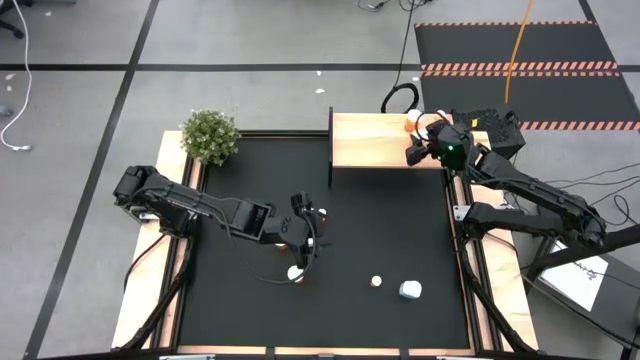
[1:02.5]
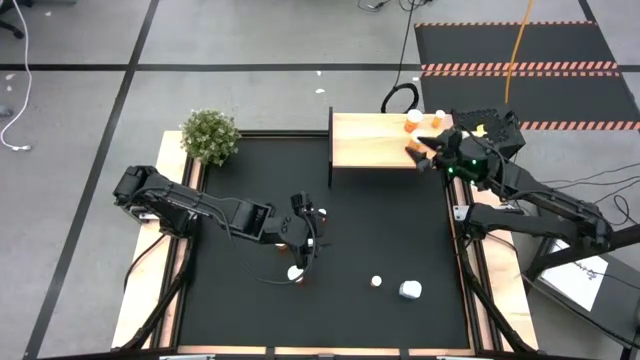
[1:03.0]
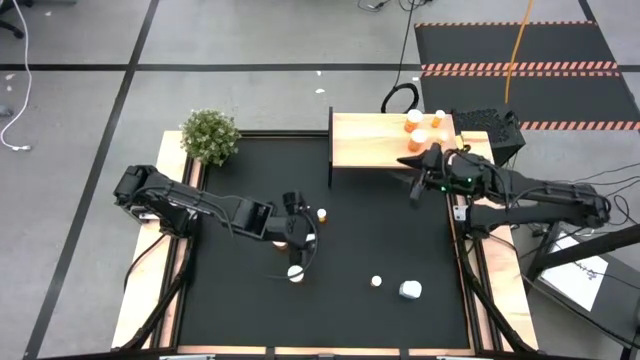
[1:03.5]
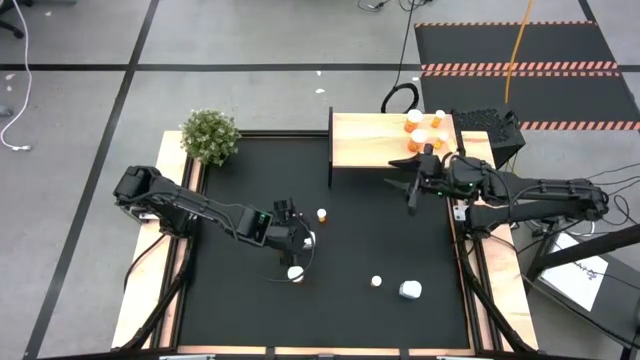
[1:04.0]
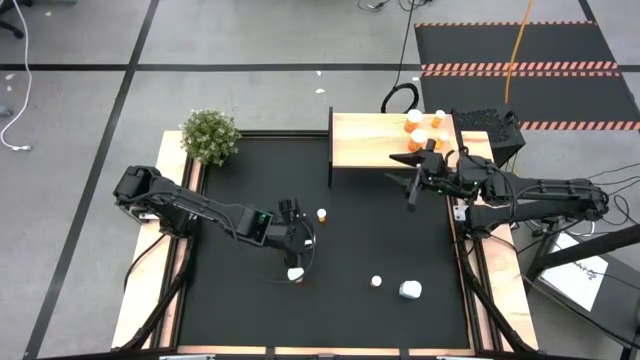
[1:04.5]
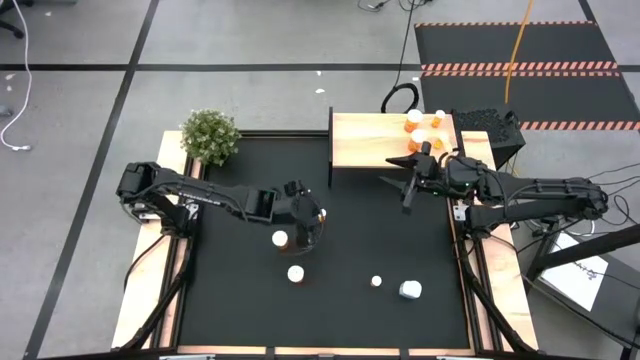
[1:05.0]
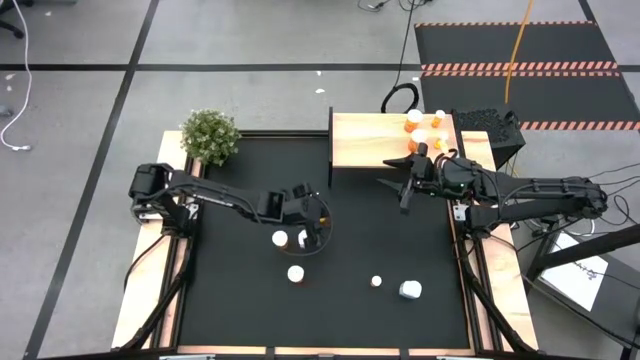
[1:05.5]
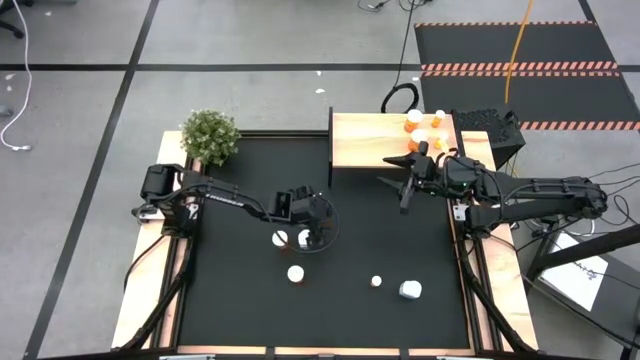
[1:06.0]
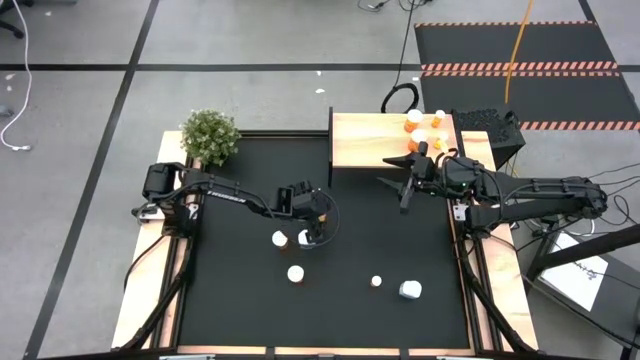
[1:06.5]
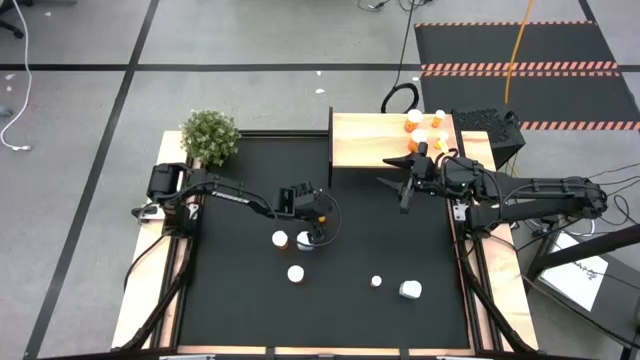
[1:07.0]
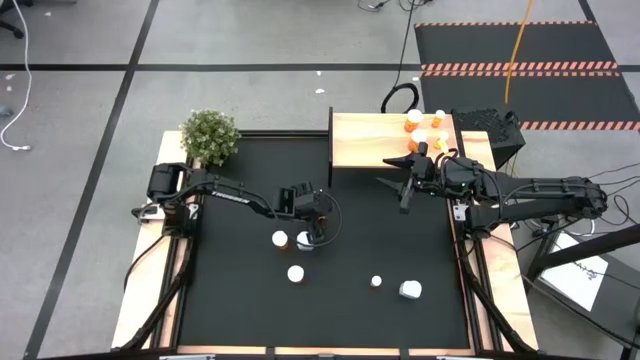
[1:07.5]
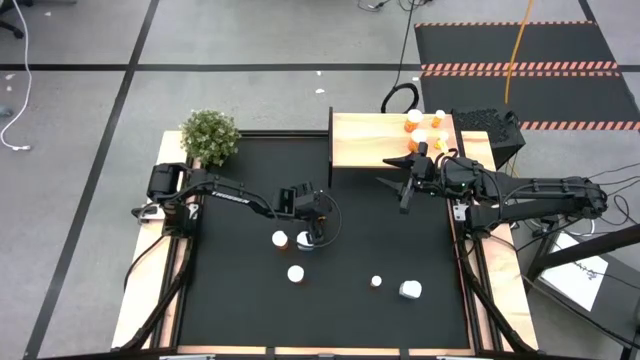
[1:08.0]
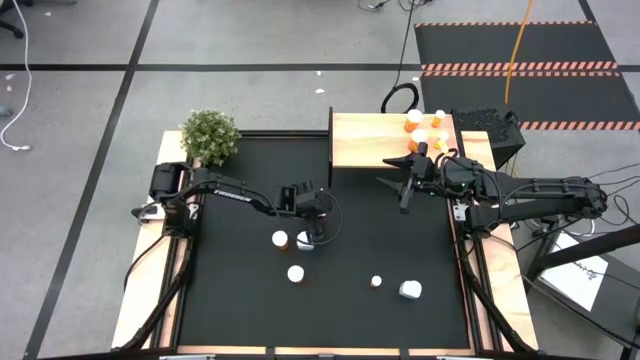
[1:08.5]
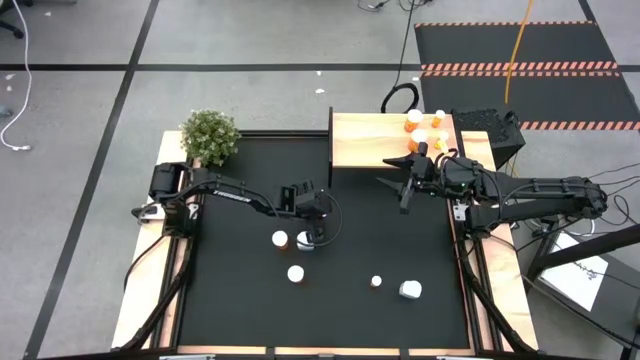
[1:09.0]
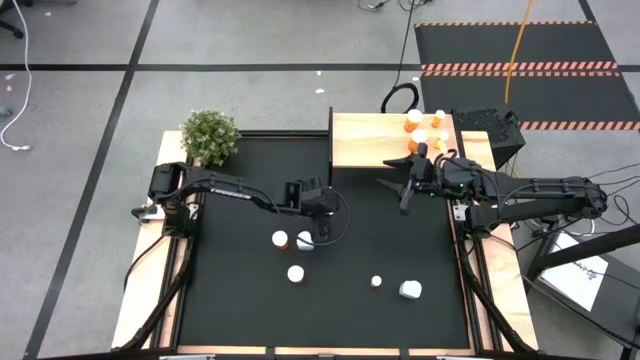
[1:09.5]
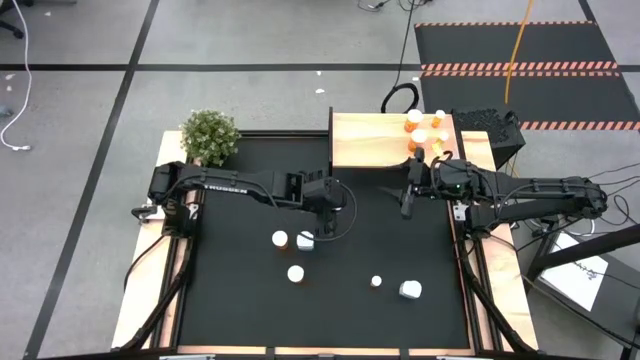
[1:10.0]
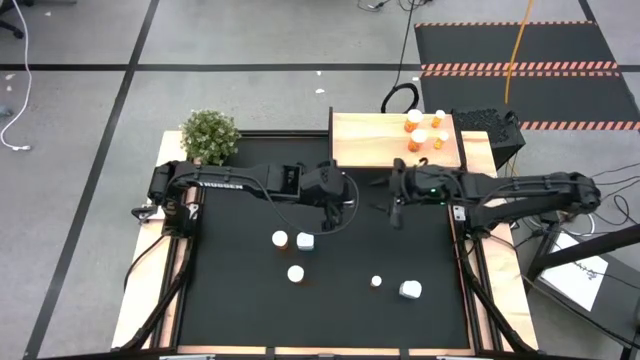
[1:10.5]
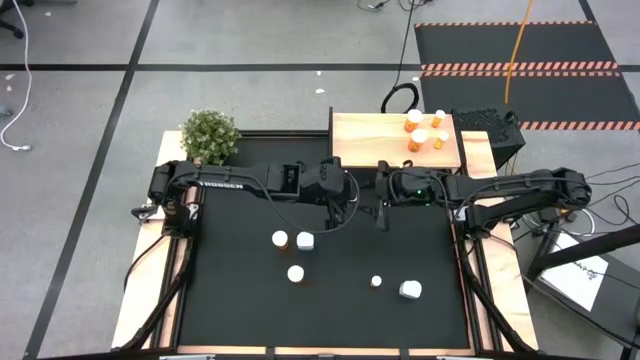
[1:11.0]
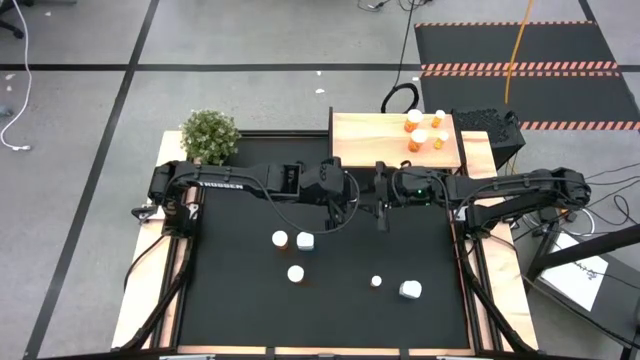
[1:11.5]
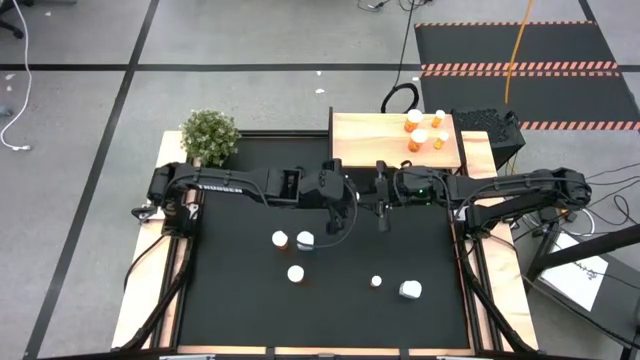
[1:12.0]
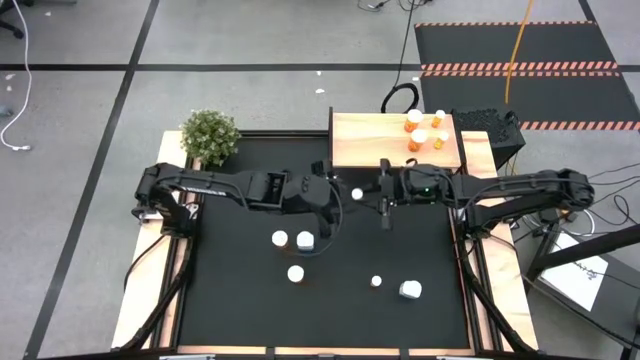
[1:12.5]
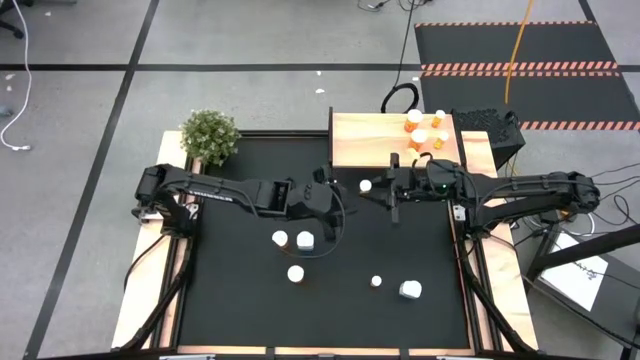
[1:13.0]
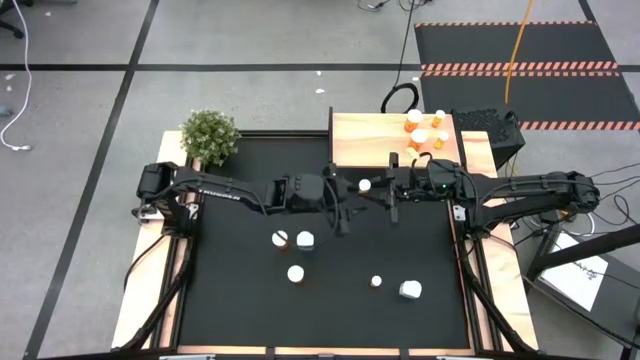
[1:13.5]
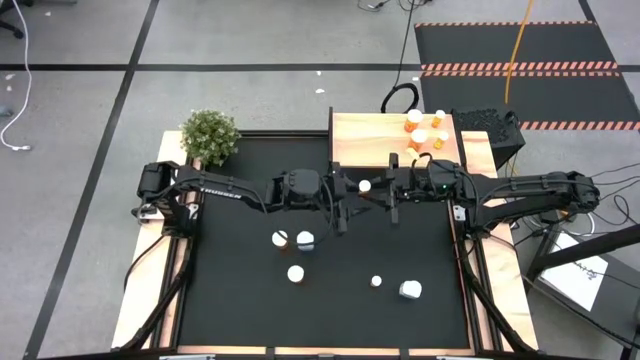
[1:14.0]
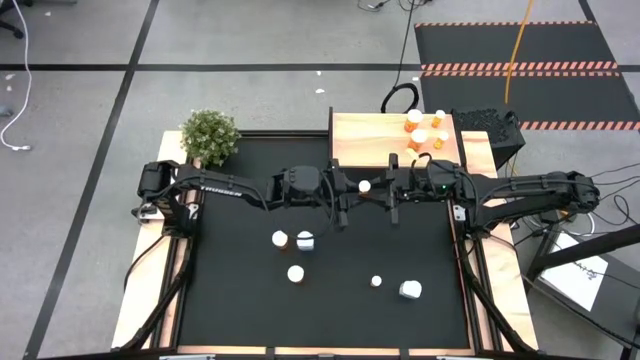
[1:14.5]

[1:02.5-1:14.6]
Task: Pick and place medicine bottles onto shelf by color
Put the small orange pill bottle on the shelf

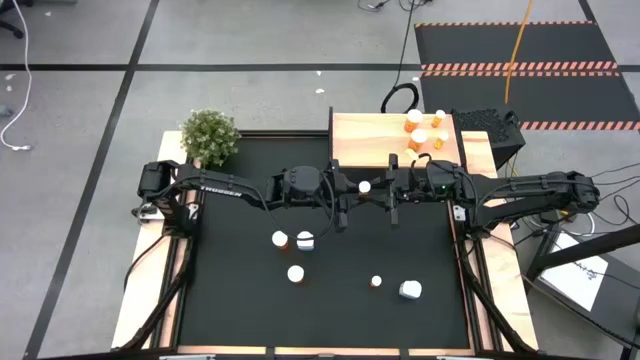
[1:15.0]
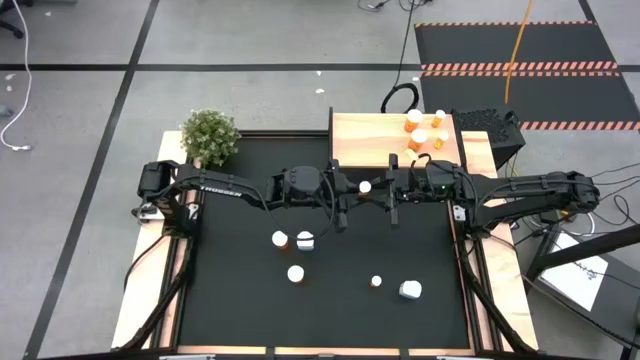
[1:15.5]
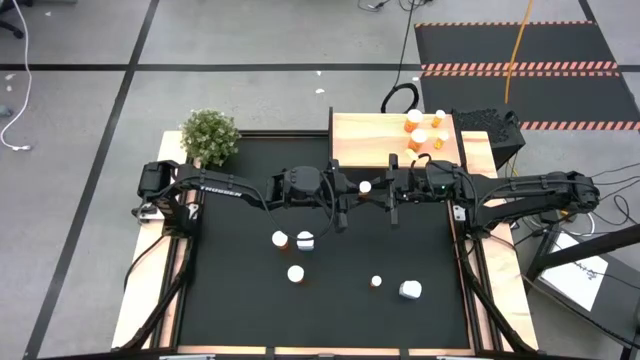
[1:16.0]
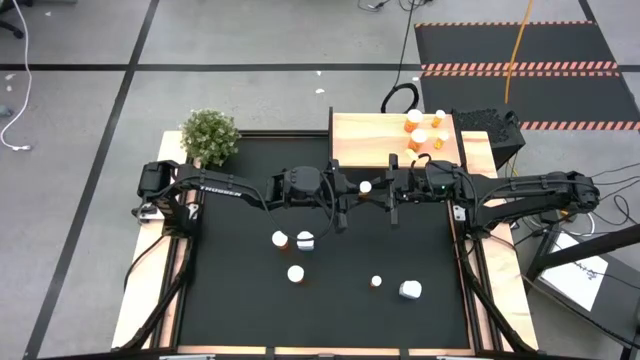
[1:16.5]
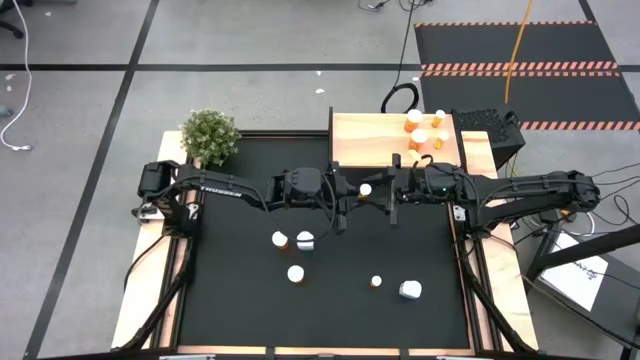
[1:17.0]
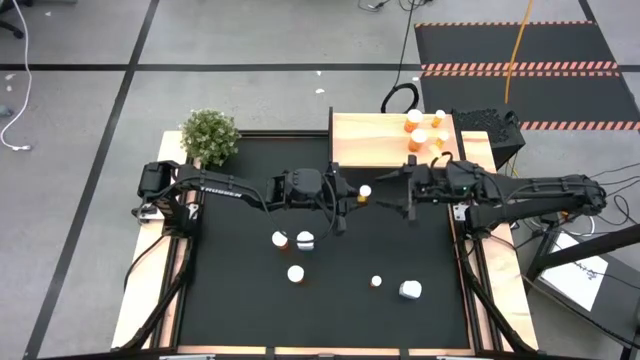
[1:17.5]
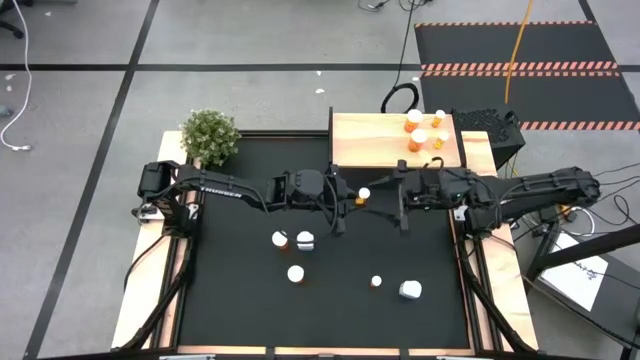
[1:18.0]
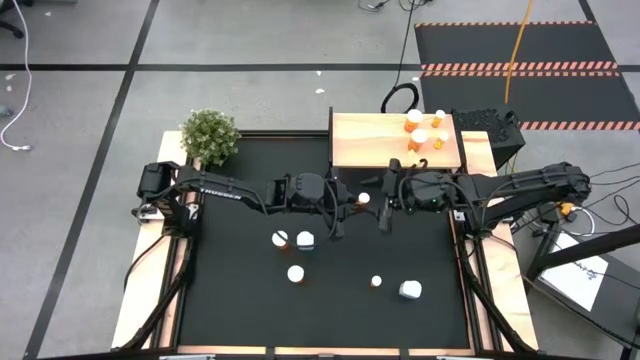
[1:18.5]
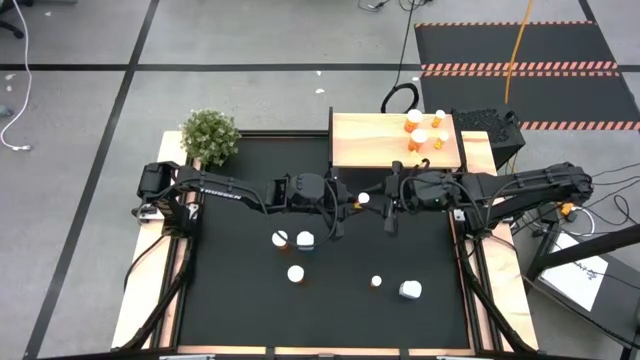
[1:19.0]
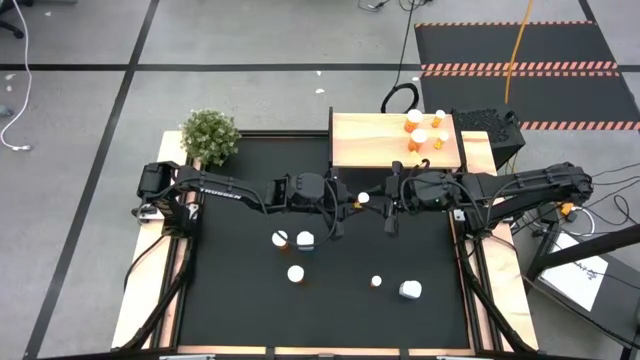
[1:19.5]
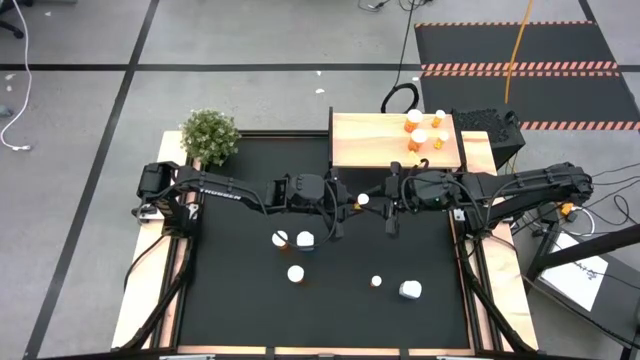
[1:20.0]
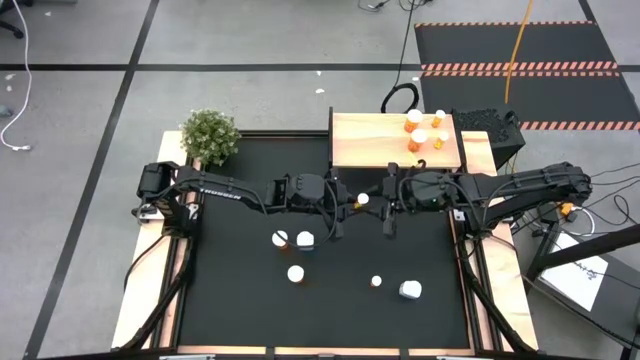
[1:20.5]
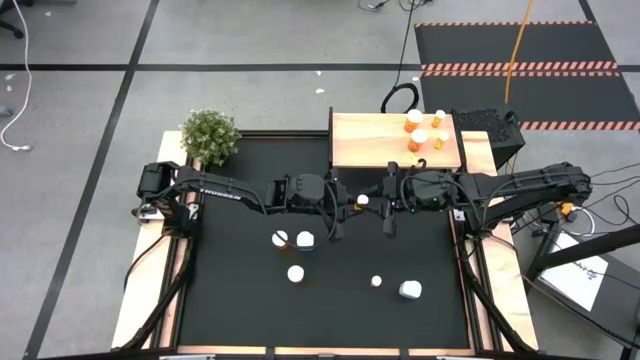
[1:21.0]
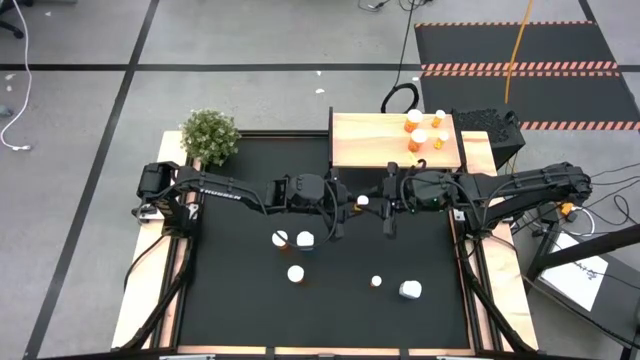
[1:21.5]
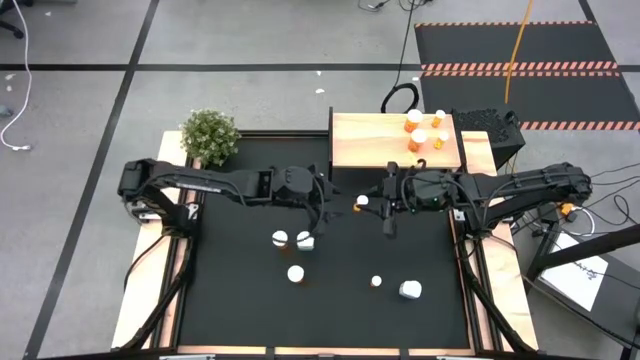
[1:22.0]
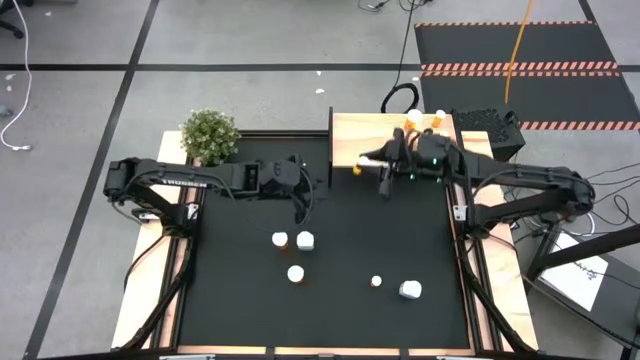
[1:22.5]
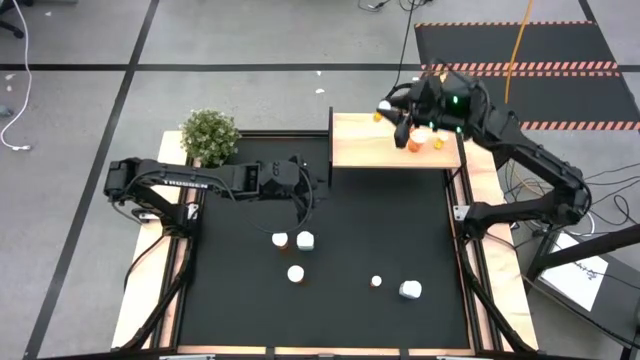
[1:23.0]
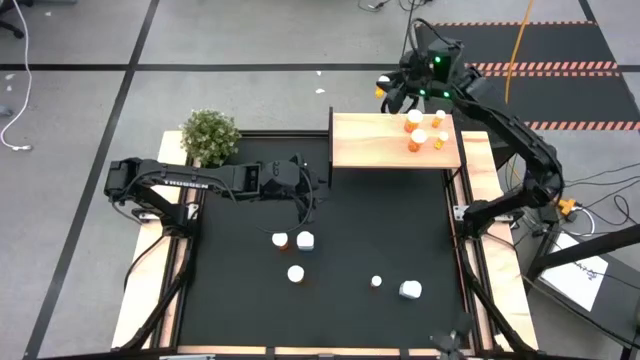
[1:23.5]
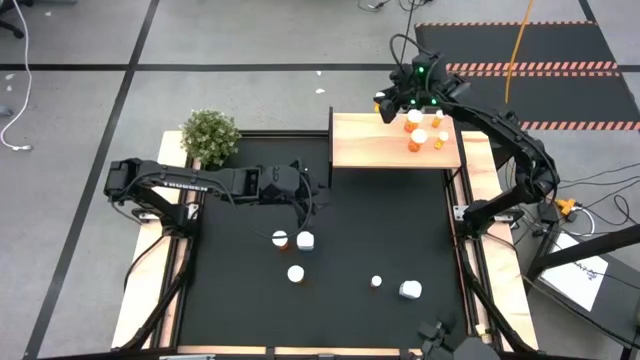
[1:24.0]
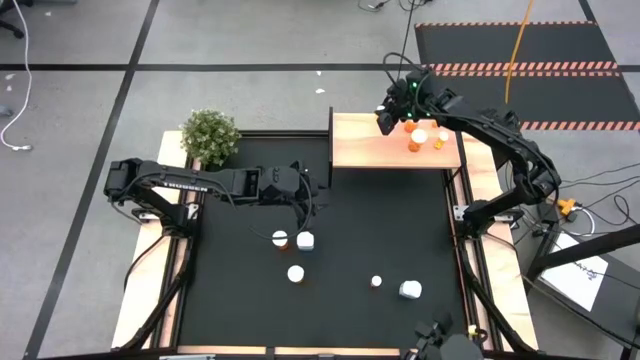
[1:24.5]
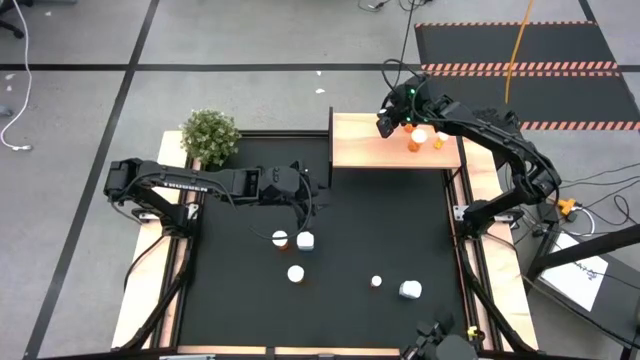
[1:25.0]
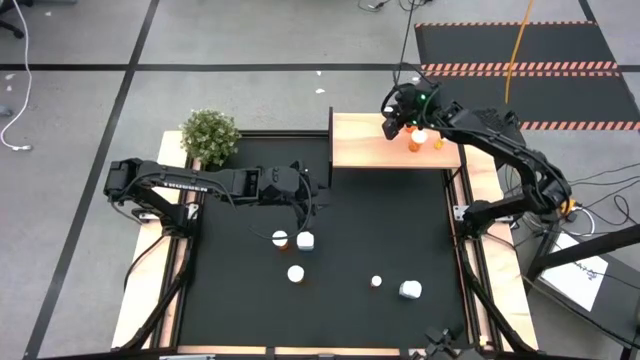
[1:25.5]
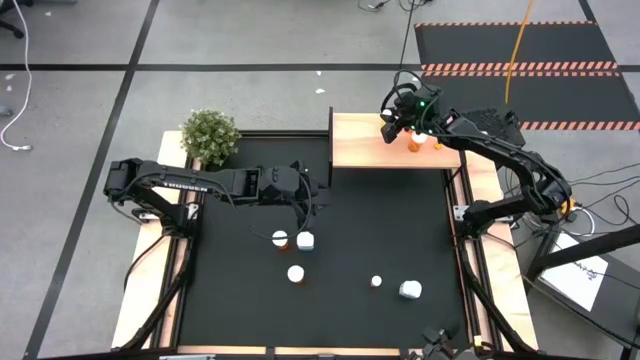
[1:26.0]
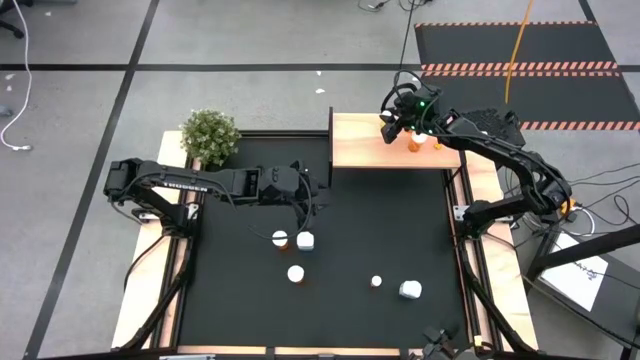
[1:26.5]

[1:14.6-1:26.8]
Put the small orange pill bottle on the shelf
